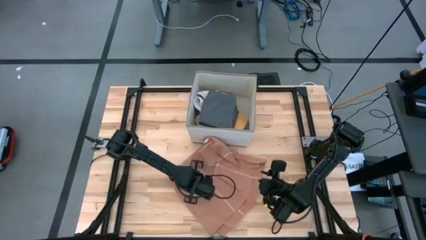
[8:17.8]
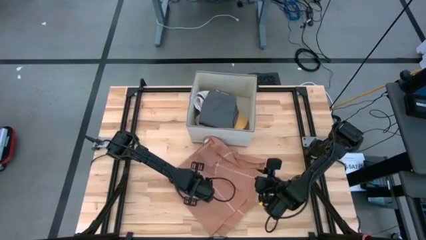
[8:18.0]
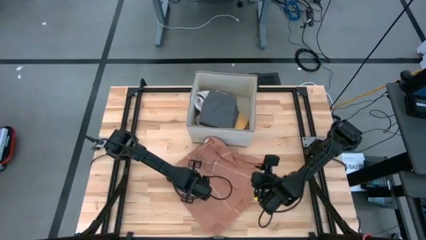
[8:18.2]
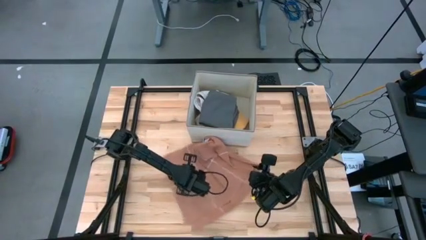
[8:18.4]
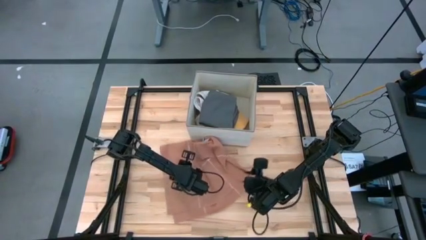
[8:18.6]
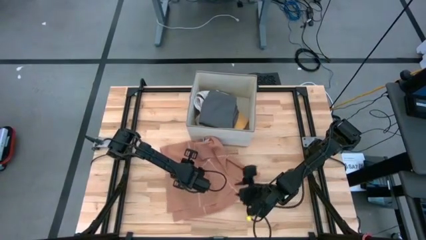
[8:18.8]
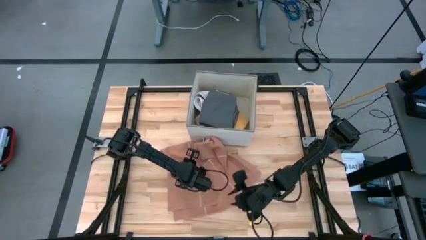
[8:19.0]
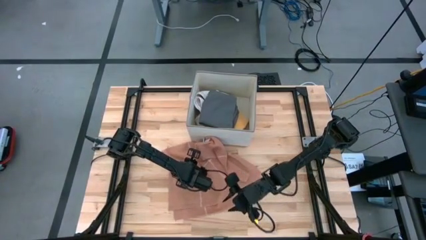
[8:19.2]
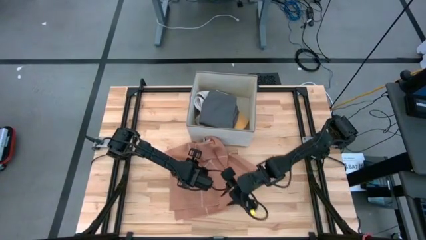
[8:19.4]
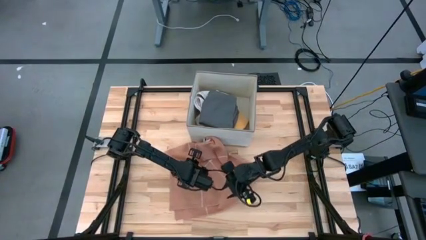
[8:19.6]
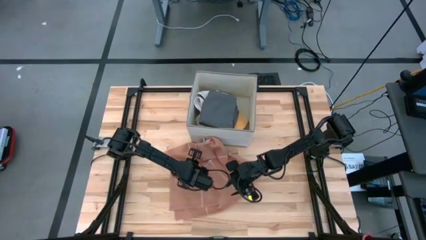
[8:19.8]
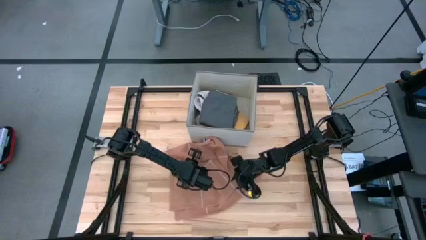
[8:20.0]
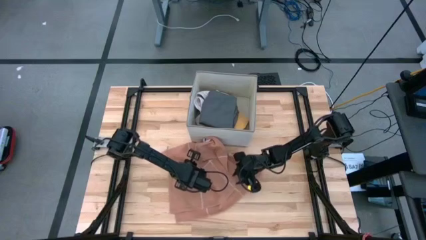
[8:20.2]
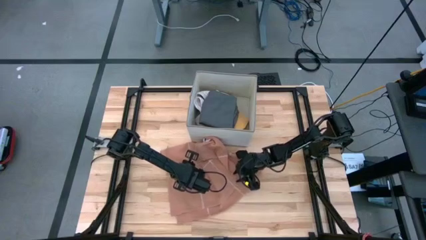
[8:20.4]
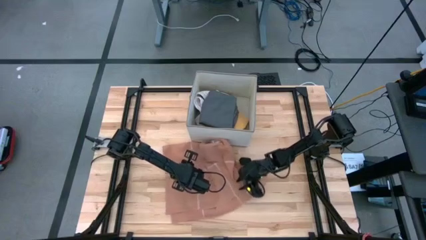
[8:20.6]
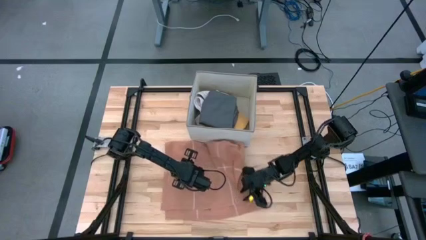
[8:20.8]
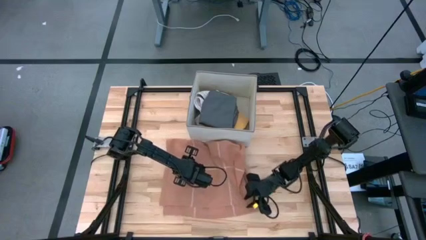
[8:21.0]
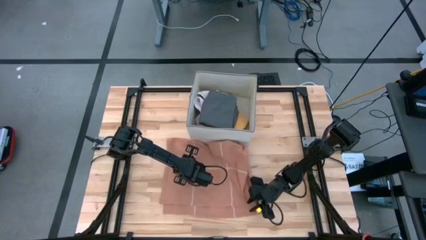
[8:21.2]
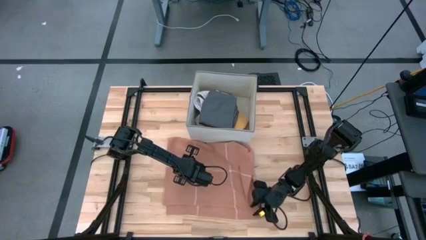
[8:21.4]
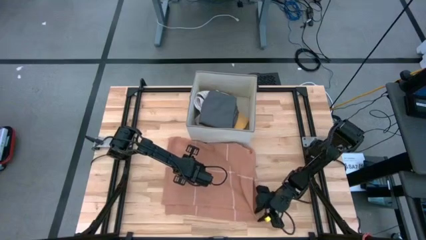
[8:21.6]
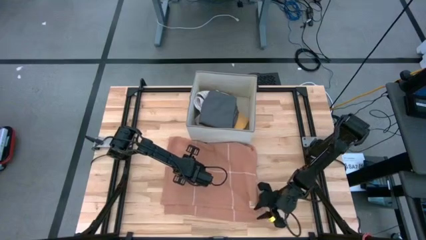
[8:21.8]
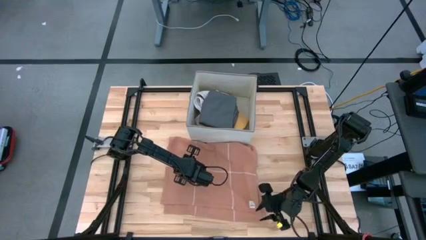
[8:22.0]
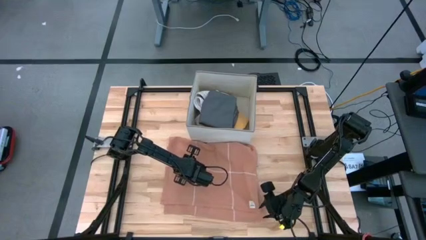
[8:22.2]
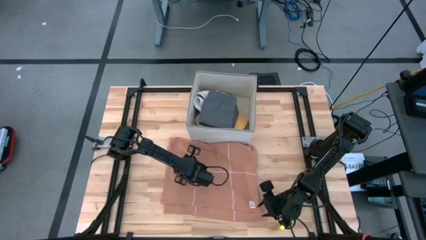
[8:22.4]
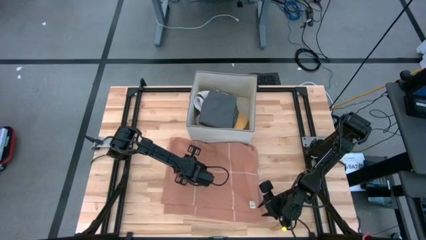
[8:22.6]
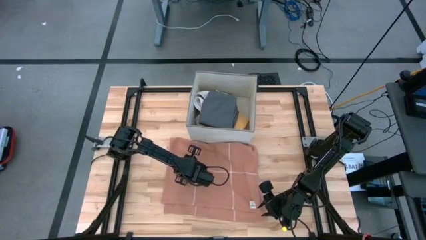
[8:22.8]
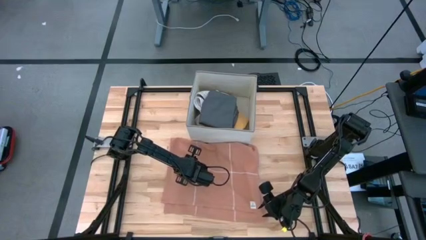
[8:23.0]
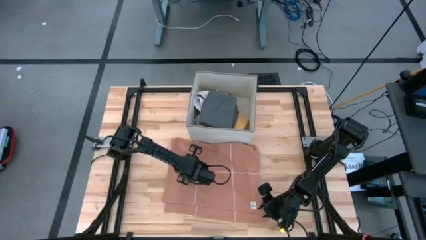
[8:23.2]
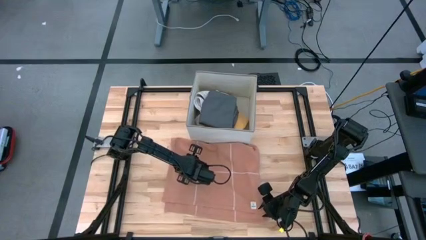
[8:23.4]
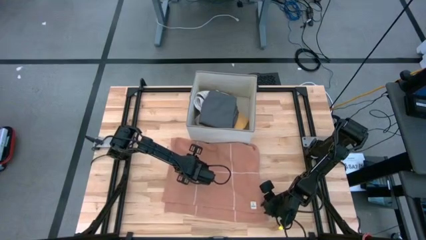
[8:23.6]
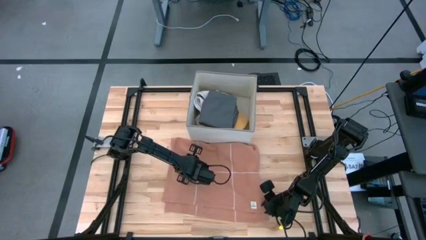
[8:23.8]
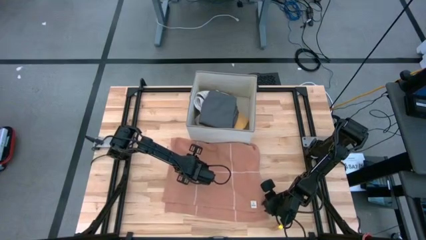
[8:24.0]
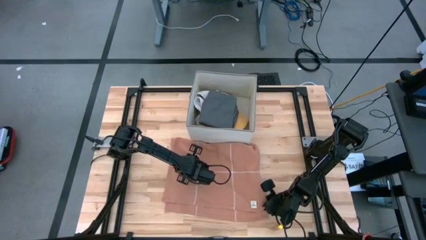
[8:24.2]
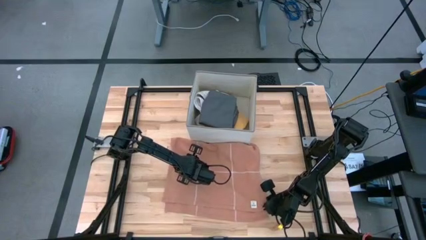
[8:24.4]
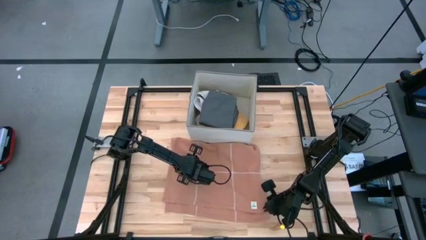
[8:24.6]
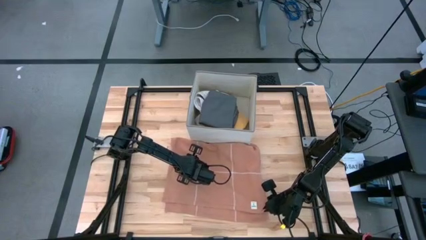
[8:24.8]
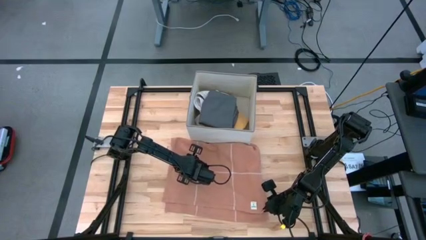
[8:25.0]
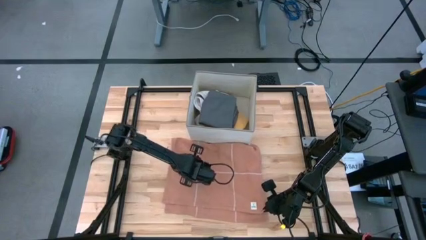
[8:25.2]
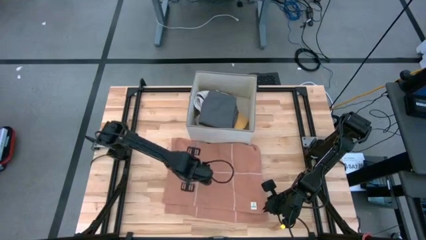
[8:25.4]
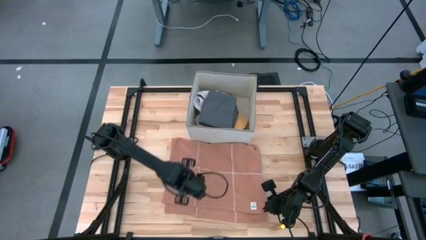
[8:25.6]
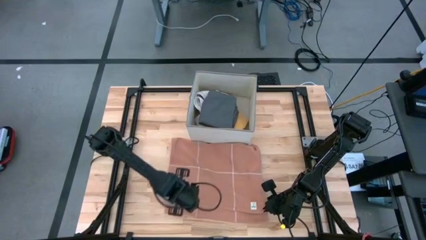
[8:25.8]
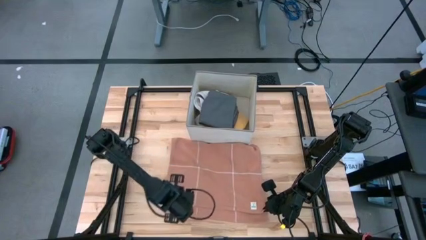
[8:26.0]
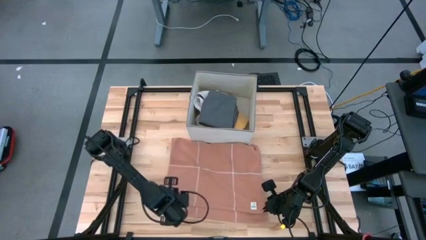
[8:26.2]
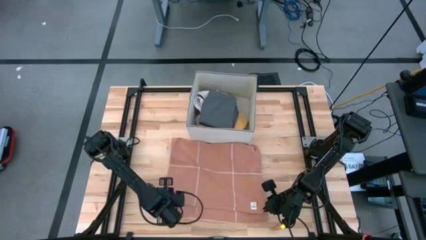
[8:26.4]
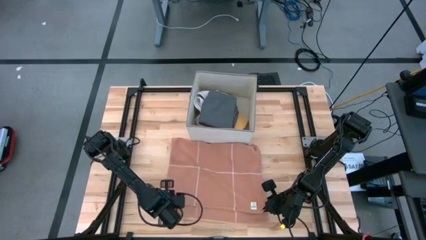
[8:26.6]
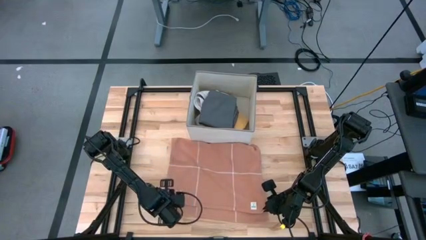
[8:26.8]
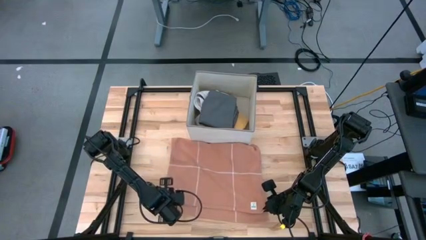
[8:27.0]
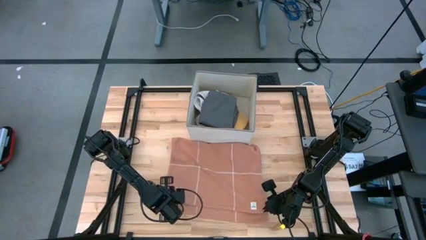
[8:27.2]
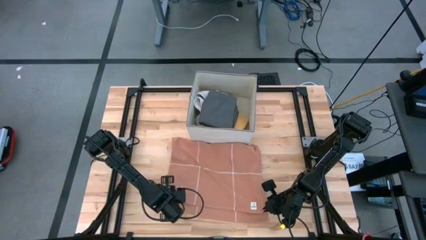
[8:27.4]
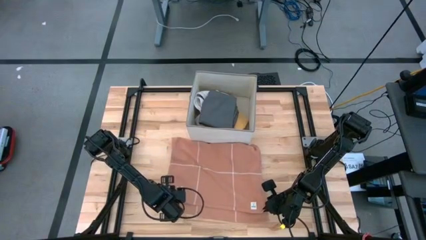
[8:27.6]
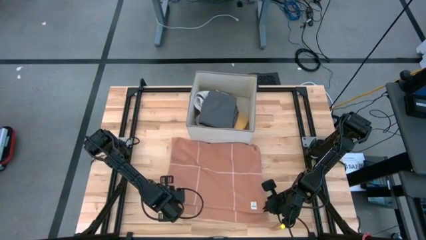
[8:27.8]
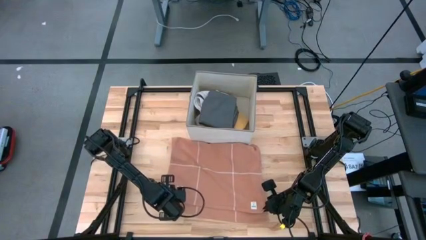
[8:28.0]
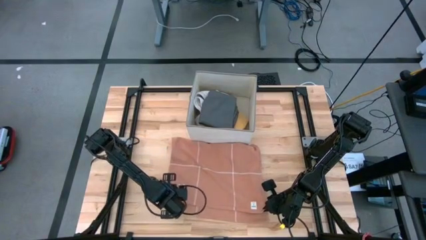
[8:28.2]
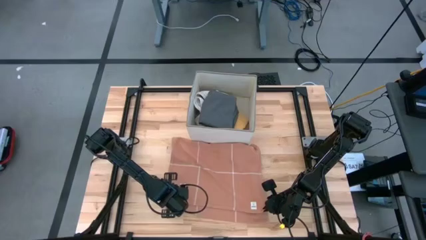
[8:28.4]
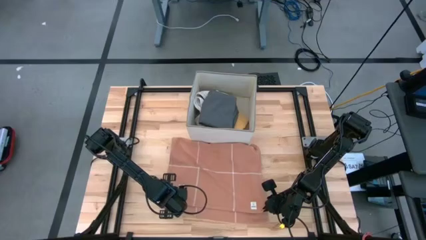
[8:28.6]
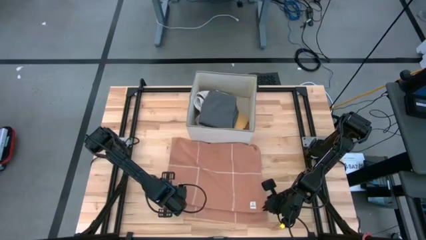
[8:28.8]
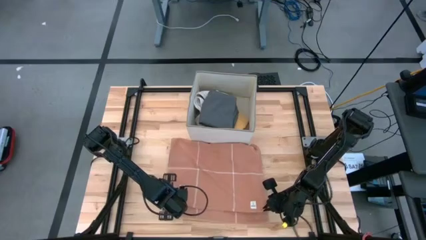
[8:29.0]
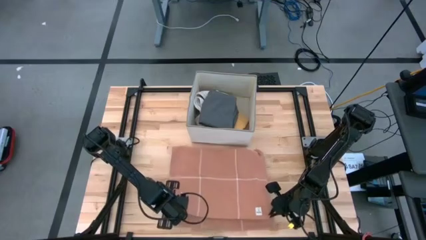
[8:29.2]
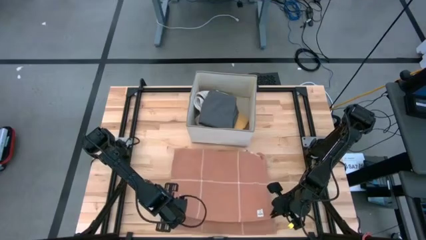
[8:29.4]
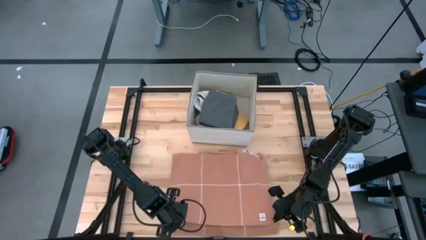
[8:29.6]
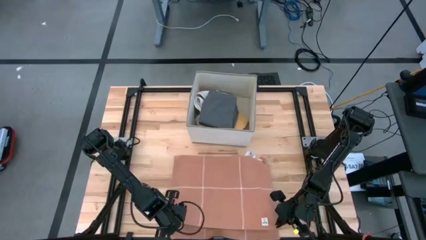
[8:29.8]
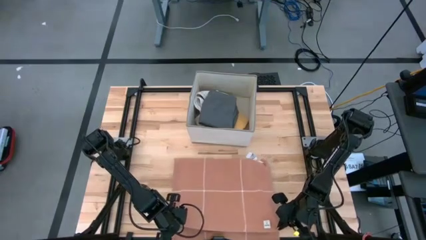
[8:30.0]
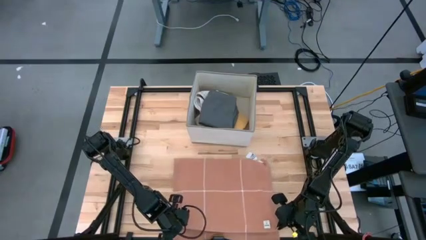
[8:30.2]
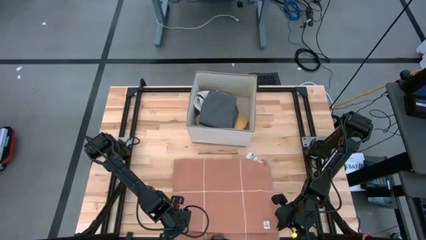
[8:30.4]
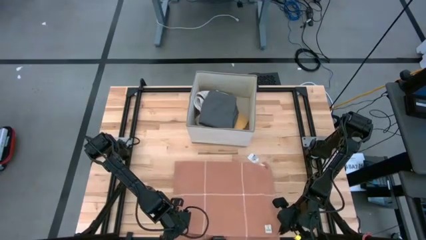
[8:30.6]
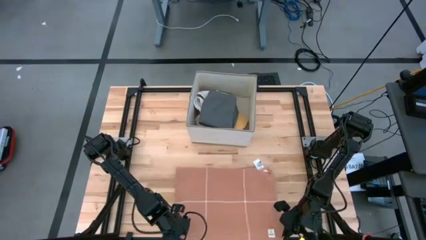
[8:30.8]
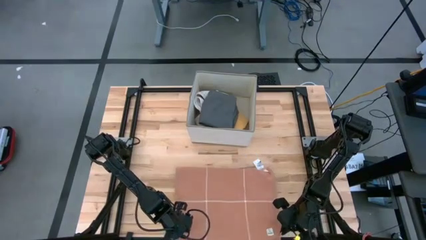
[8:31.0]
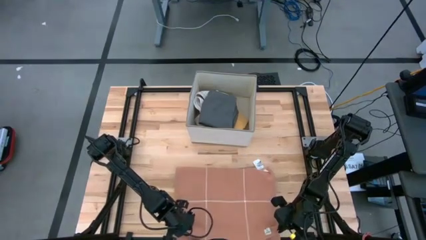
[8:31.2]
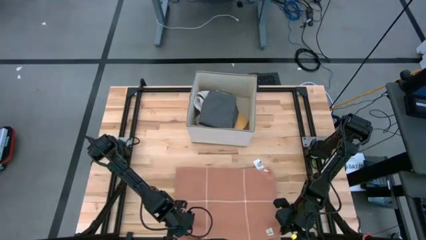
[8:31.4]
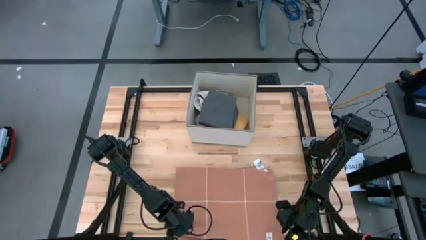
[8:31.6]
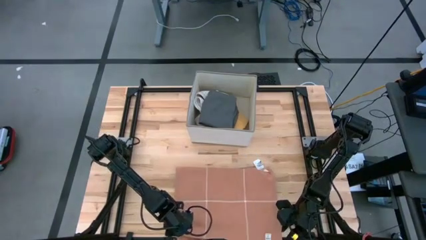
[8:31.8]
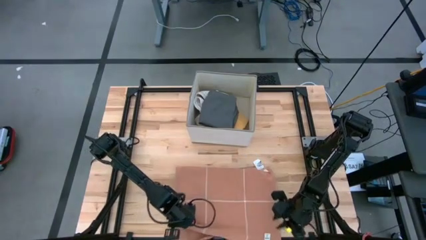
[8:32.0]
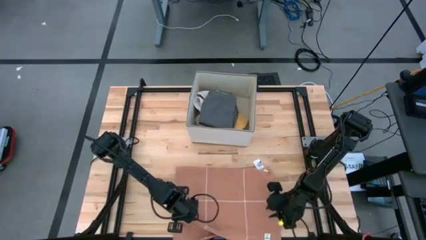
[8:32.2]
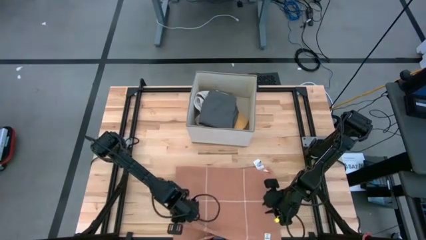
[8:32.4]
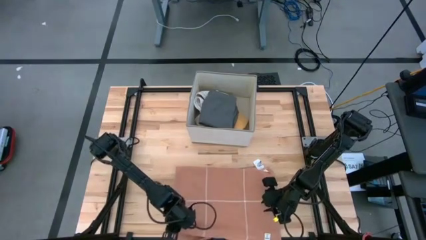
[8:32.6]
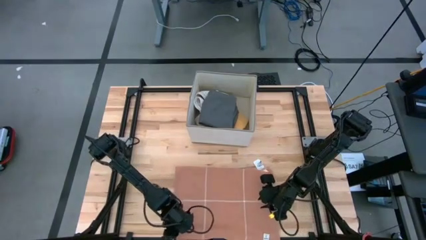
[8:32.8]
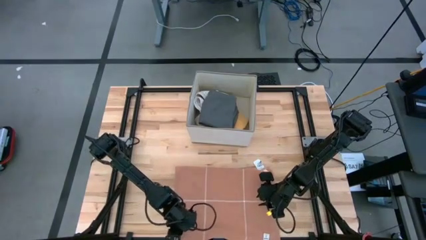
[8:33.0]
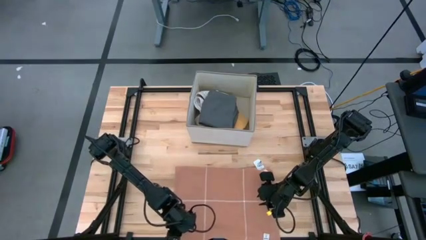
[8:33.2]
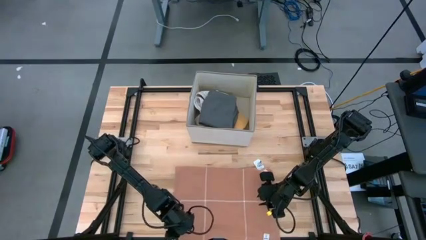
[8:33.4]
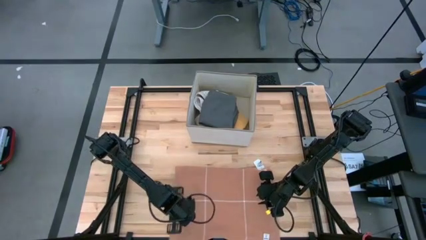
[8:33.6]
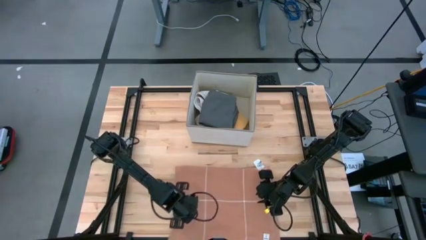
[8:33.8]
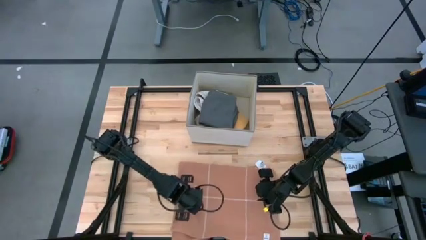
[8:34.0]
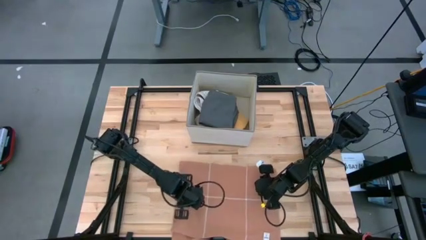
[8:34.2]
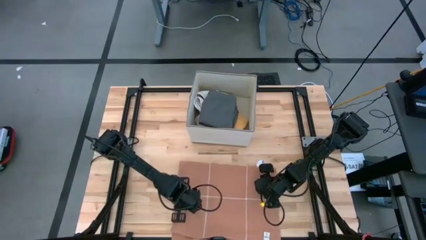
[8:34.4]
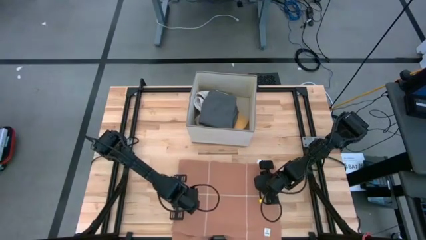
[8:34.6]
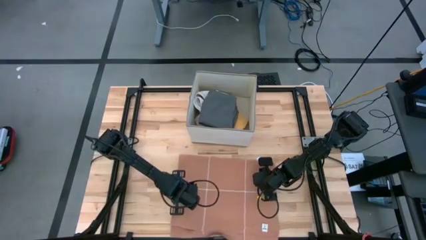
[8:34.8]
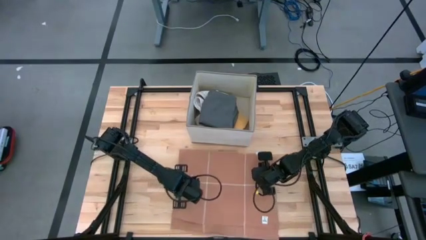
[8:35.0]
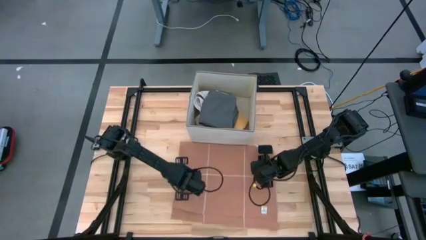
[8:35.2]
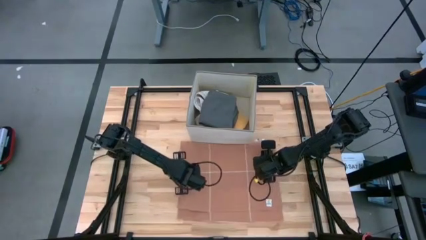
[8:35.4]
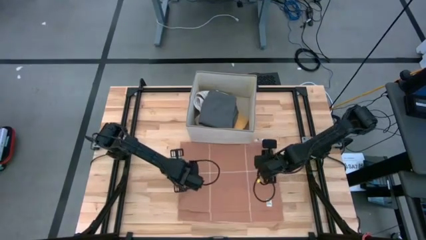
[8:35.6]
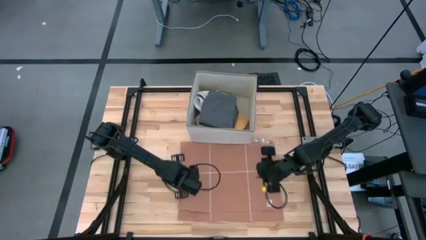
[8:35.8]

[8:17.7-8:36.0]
Task: Fold towel
Fold the brown towel with white checkered lines
